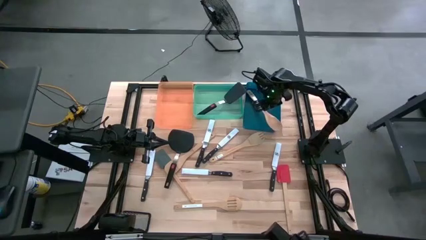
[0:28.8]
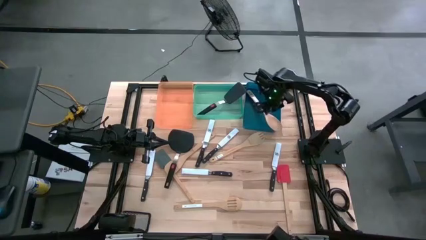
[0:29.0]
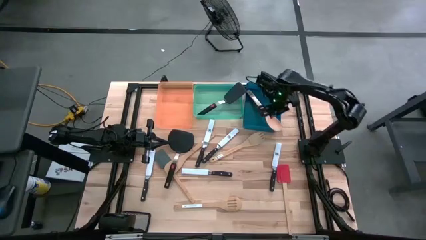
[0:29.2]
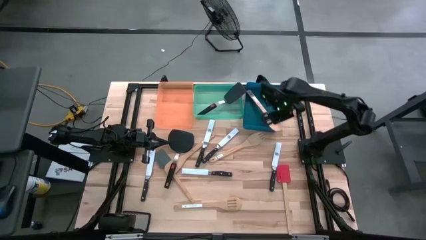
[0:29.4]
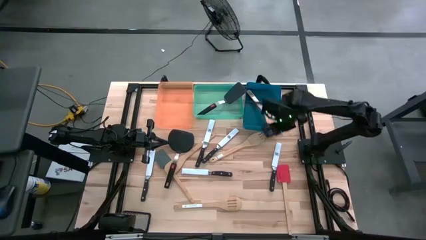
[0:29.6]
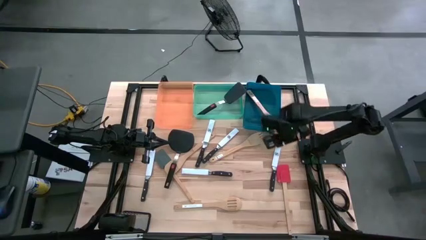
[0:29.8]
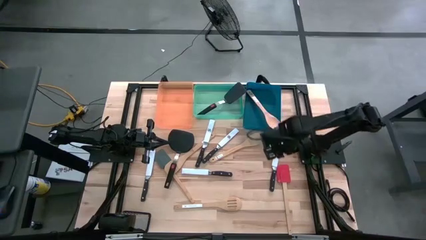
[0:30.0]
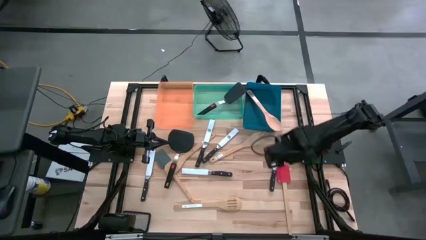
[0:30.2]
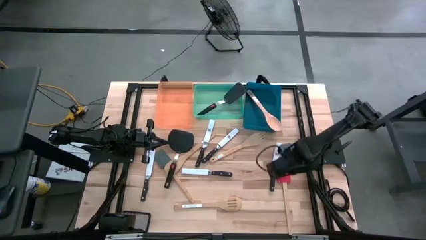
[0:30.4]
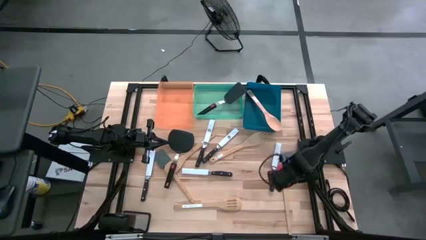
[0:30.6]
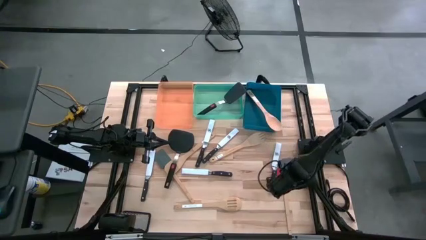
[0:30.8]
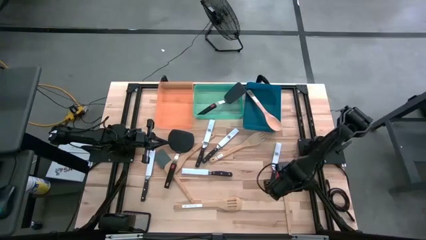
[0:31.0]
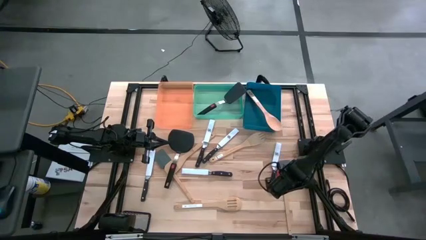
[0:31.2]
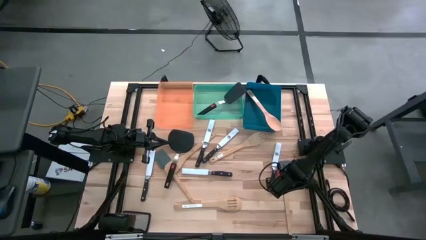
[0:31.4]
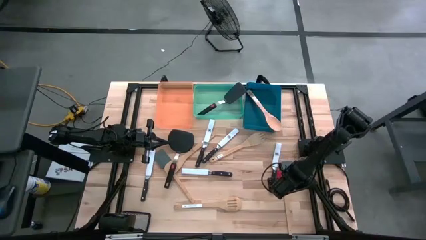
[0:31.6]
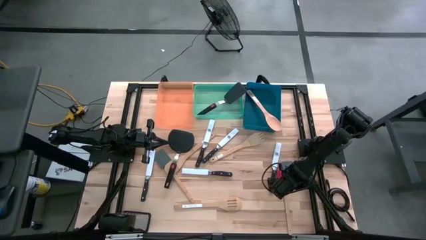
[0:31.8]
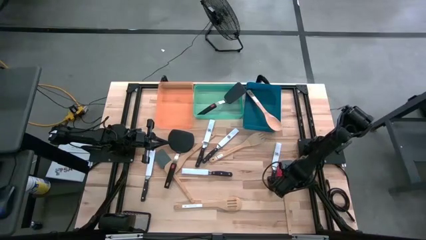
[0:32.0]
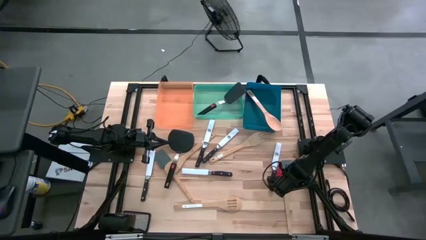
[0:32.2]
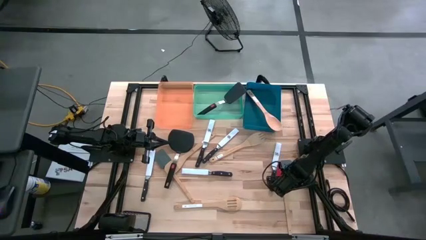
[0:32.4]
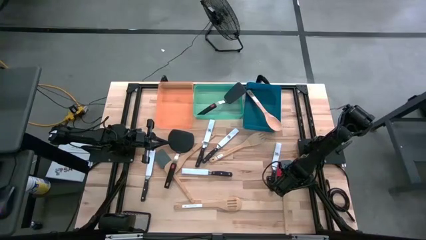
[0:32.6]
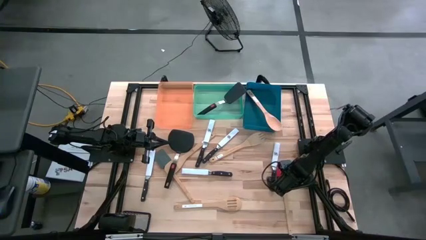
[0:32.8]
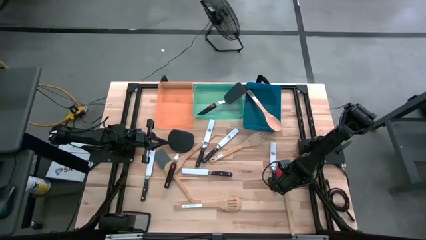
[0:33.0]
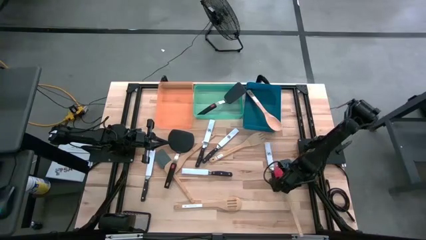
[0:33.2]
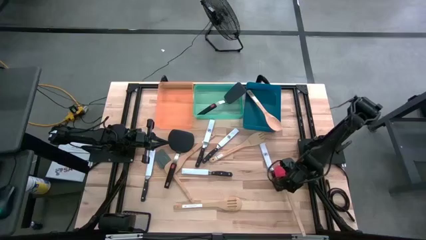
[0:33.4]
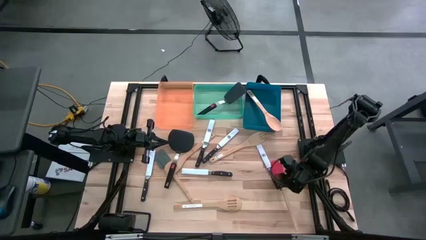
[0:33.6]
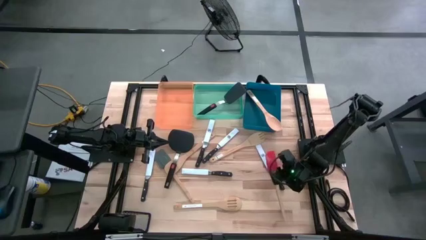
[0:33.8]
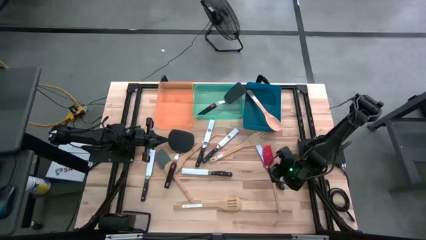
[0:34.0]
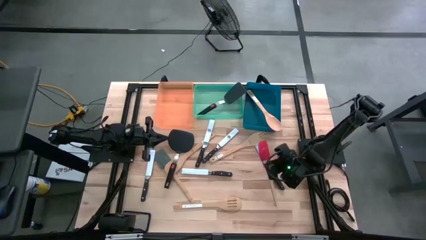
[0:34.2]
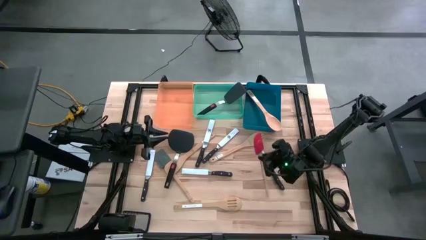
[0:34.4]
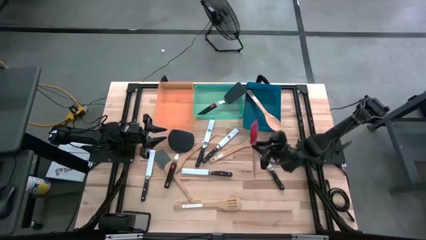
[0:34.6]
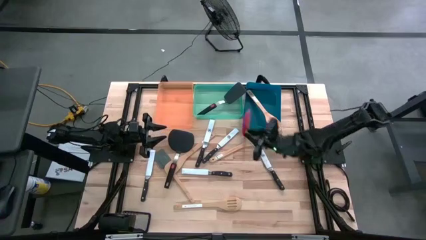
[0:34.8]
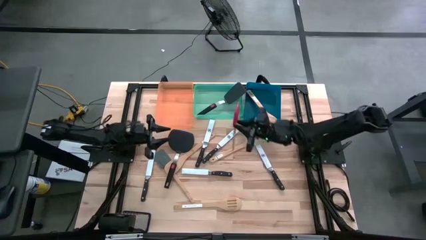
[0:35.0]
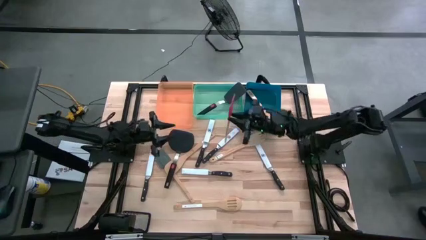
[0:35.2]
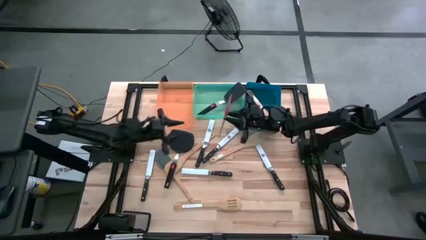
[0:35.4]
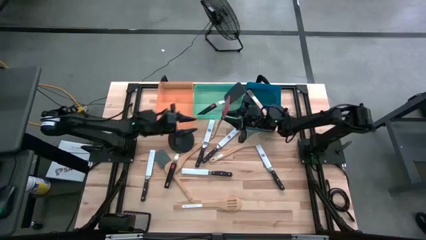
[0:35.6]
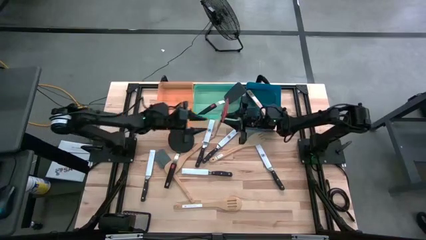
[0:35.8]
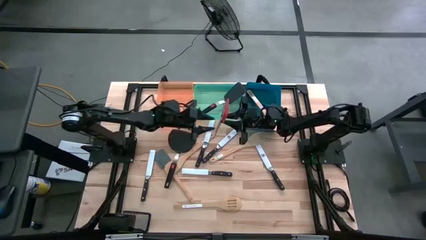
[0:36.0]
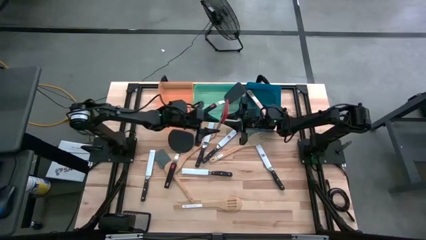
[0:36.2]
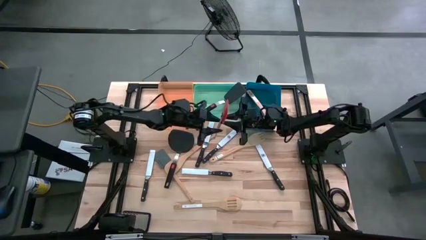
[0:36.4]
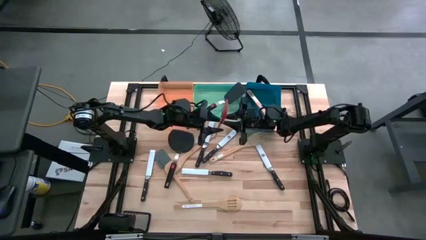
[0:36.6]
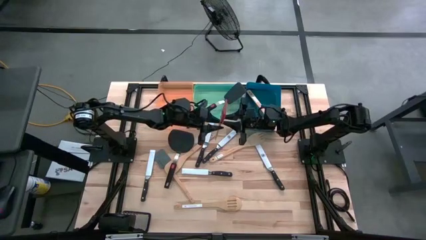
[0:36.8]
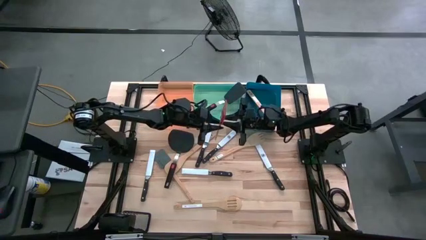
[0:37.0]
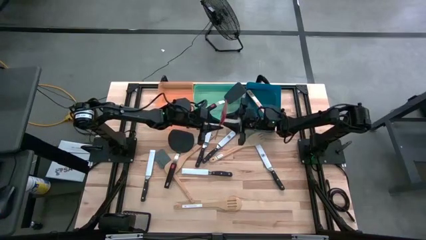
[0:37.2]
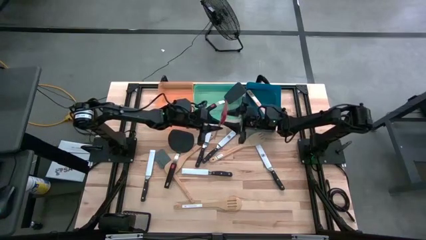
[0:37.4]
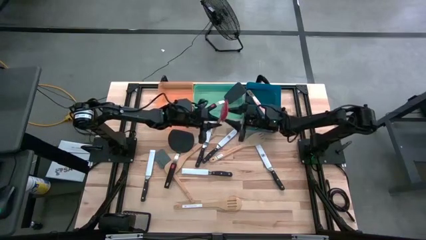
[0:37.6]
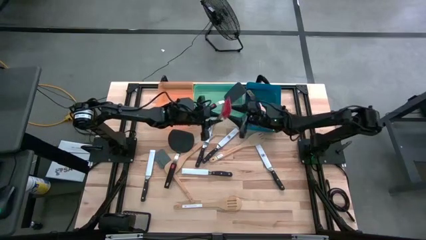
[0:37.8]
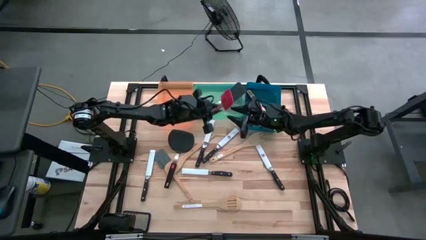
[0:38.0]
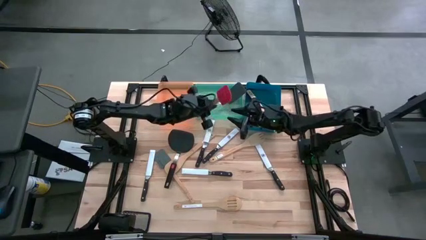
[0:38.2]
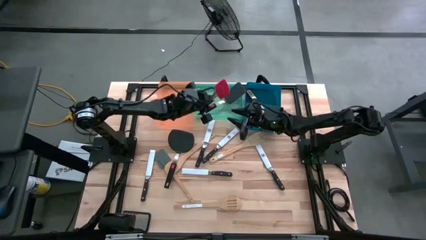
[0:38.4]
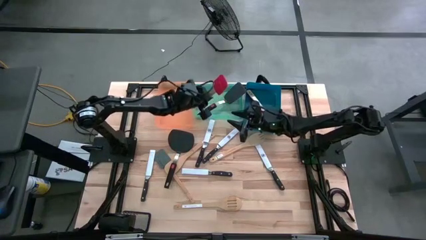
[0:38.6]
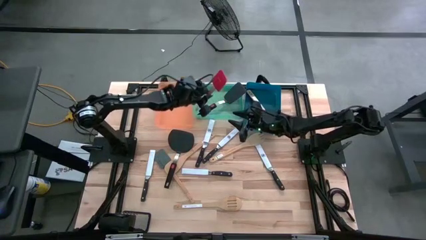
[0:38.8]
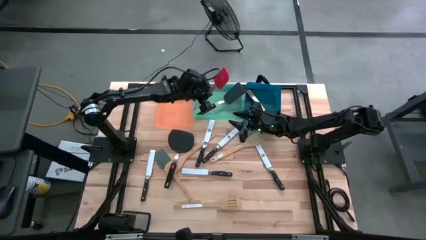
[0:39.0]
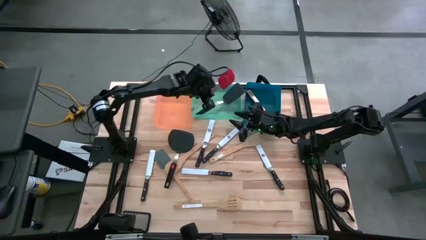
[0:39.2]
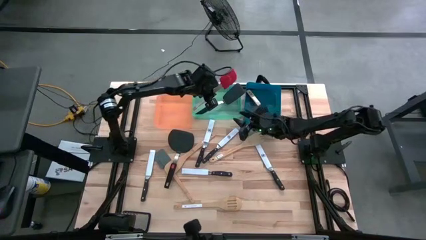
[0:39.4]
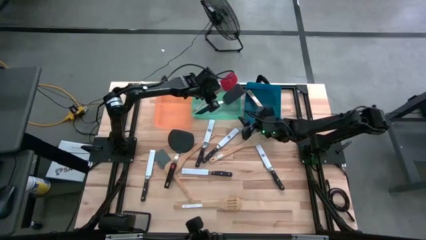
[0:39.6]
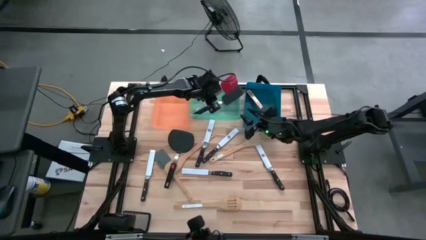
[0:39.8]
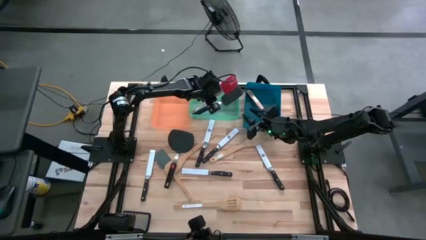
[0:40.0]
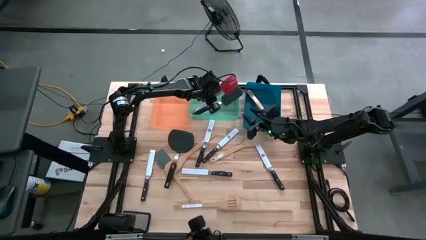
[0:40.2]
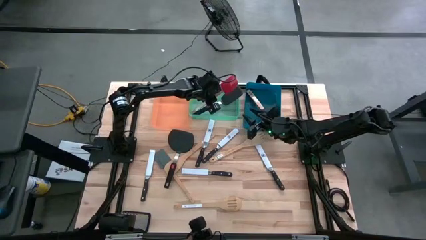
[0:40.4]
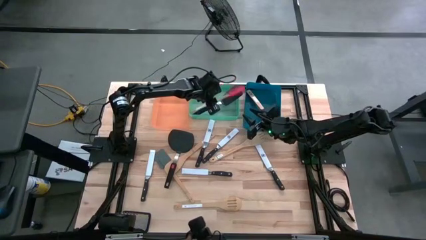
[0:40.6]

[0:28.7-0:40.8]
Task: Pick & Place Kitchen Items
Put the red spatula into the green bin

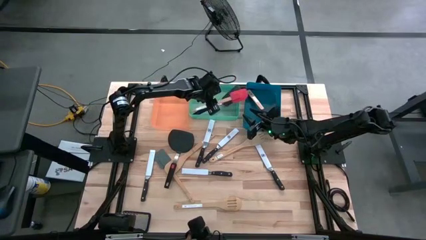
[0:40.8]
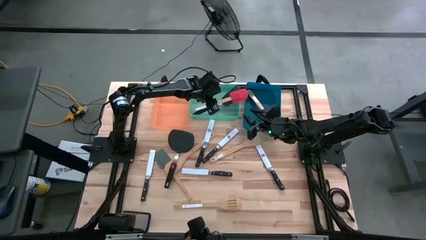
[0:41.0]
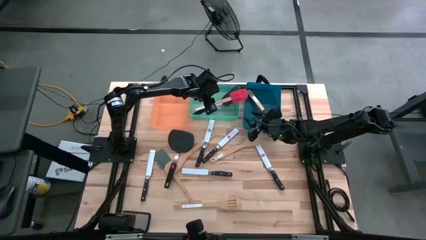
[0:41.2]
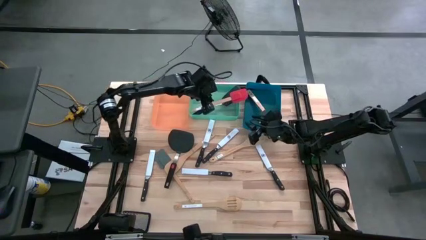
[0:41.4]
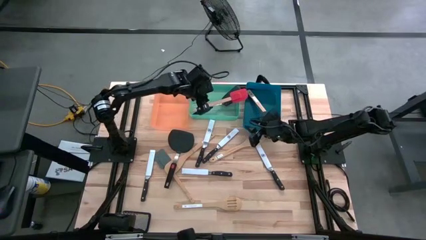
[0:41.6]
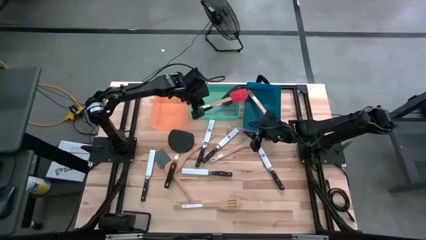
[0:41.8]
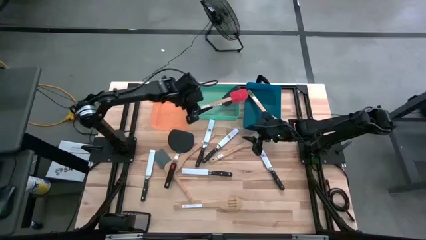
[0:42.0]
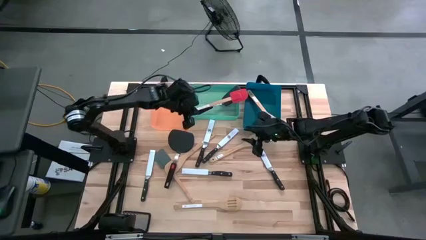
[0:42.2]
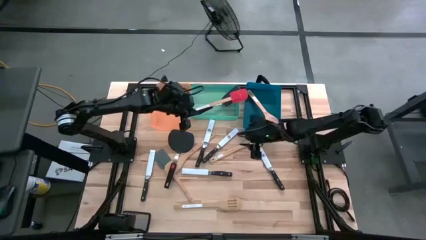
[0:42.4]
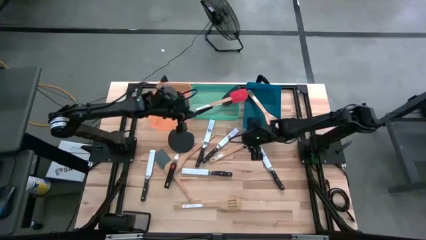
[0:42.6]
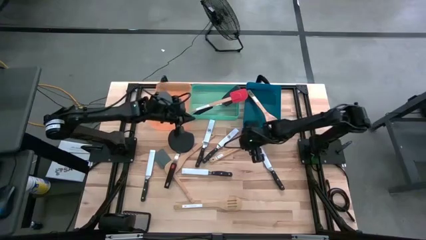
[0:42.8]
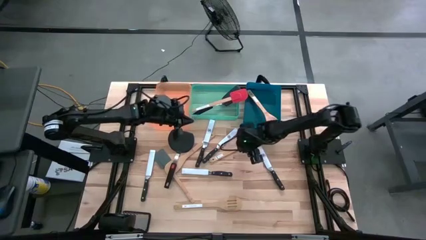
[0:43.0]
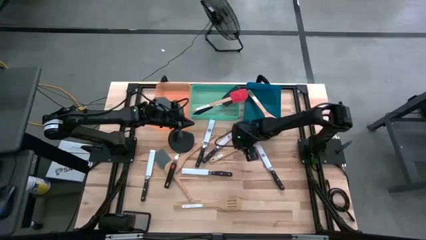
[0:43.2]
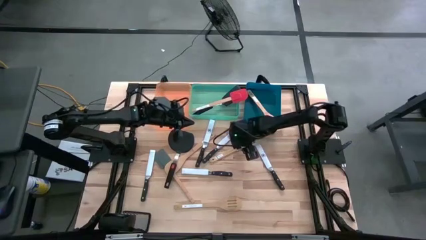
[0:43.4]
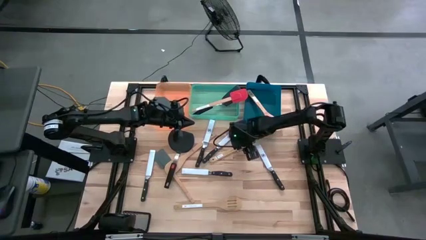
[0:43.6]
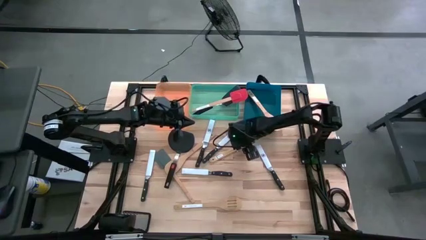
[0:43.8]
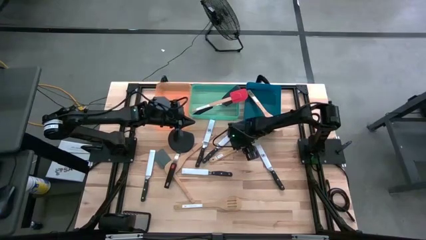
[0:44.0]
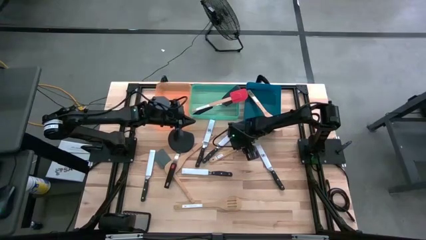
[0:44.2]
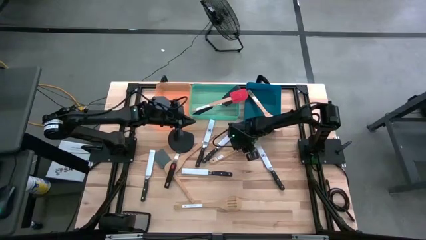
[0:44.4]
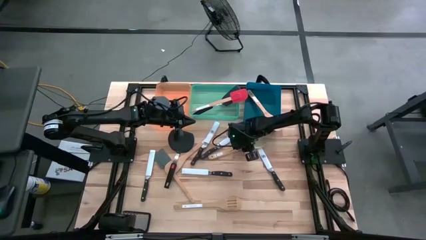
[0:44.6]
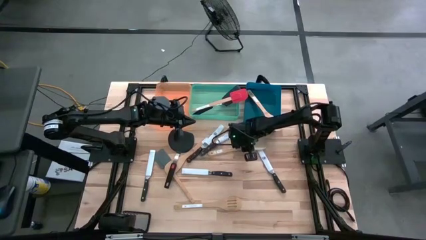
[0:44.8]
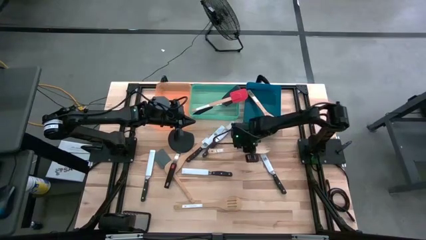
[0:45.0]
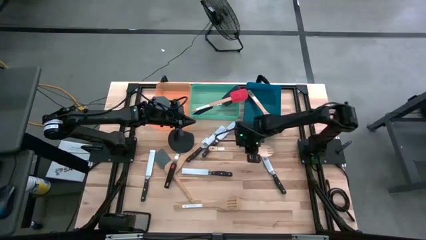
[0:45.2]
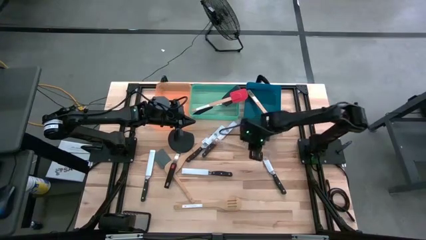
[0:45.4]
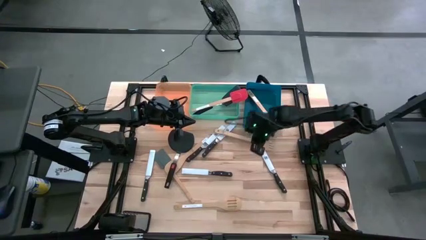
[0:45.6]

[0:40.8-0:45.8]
Put the brown serving spoon into the blue bin
